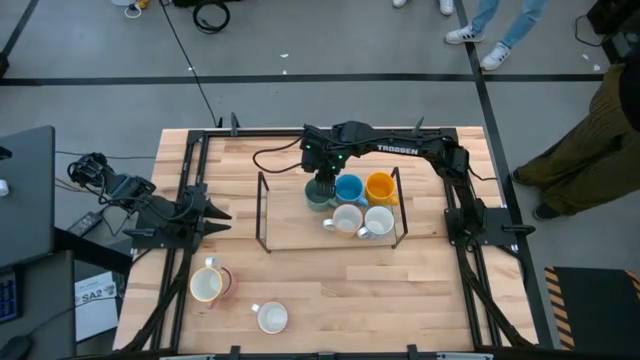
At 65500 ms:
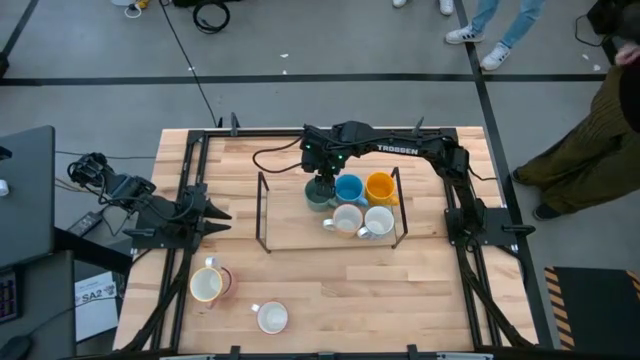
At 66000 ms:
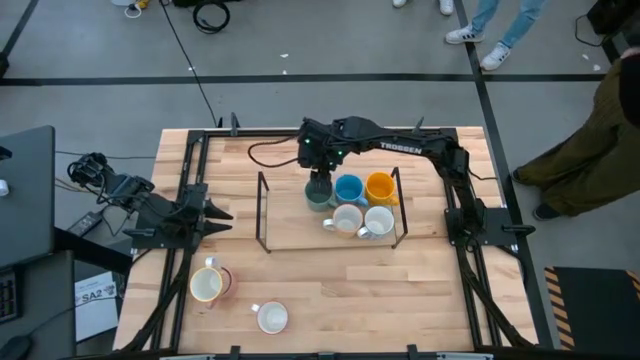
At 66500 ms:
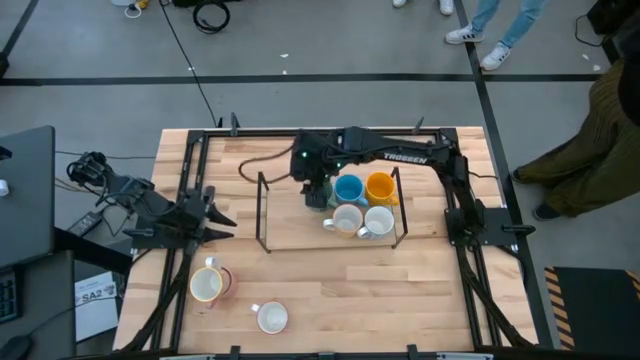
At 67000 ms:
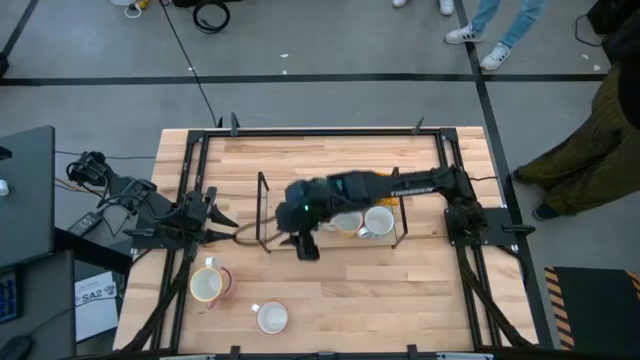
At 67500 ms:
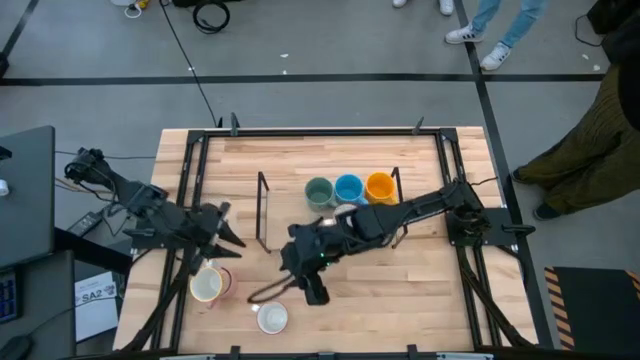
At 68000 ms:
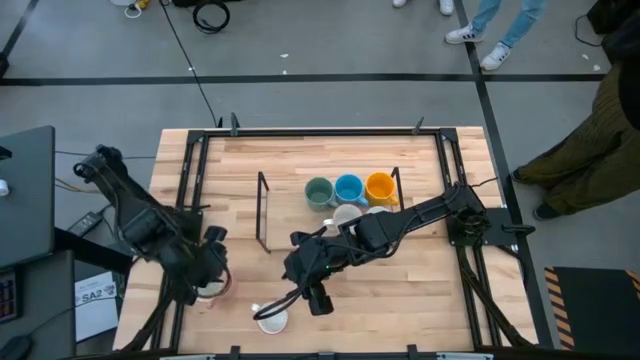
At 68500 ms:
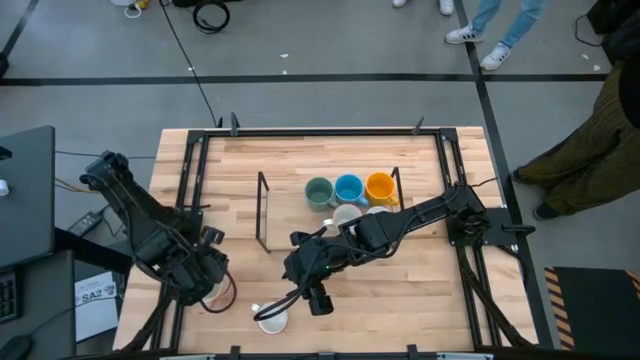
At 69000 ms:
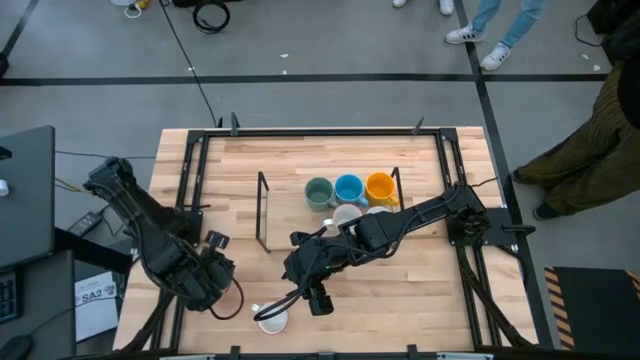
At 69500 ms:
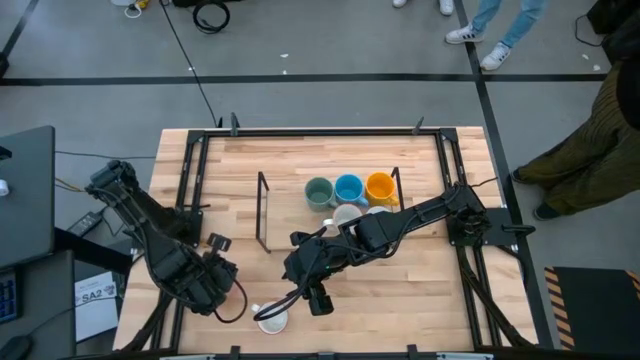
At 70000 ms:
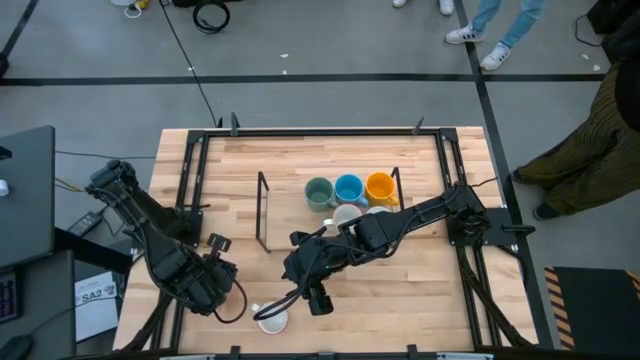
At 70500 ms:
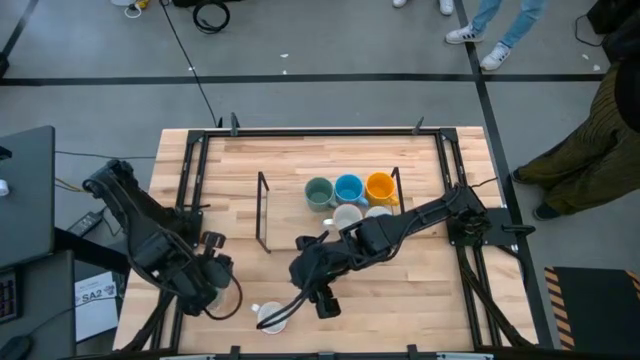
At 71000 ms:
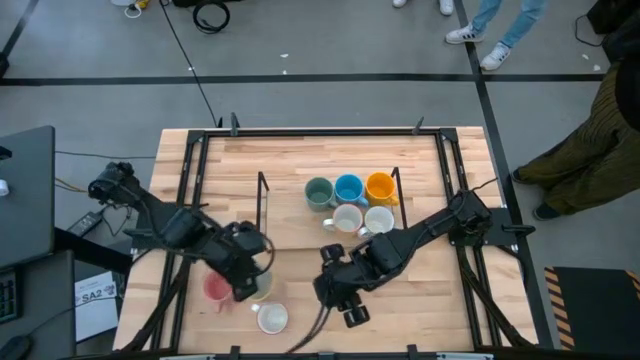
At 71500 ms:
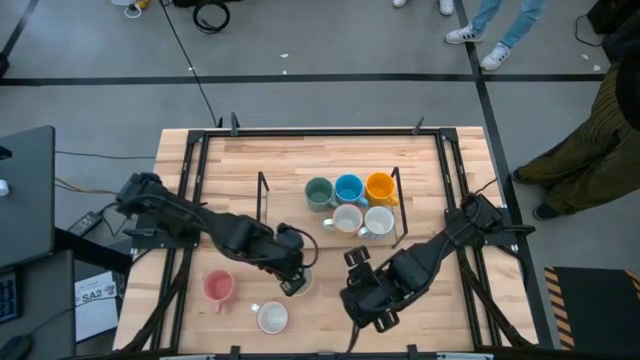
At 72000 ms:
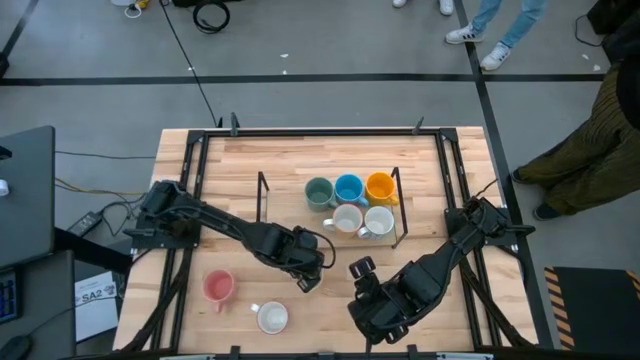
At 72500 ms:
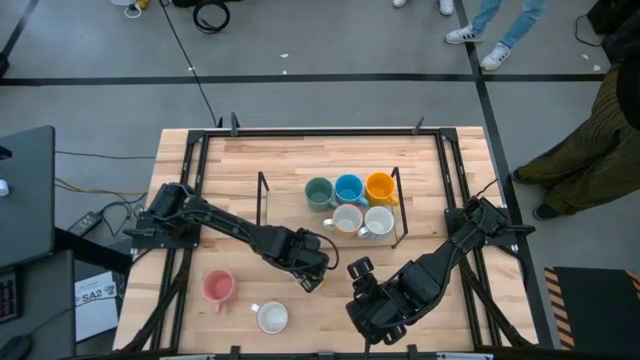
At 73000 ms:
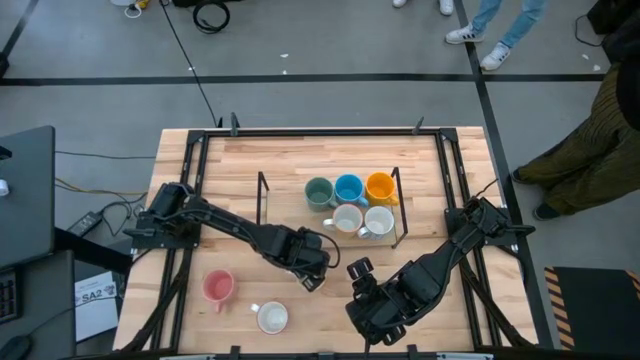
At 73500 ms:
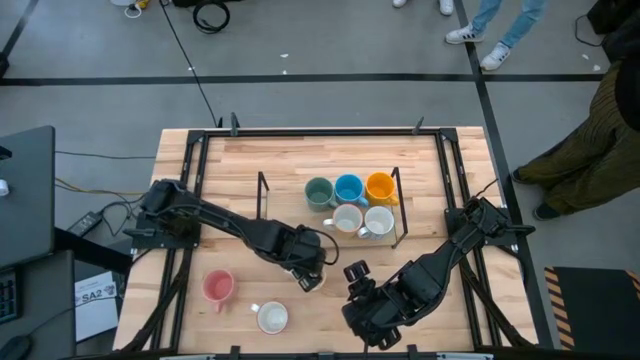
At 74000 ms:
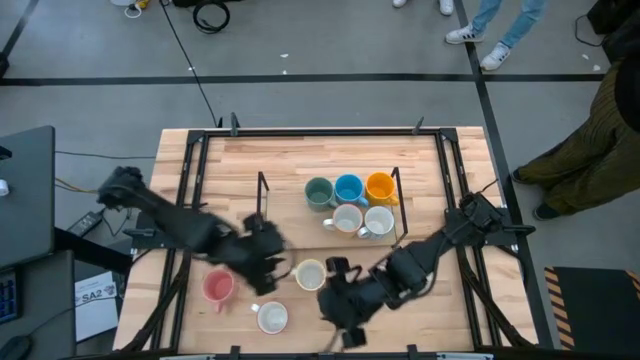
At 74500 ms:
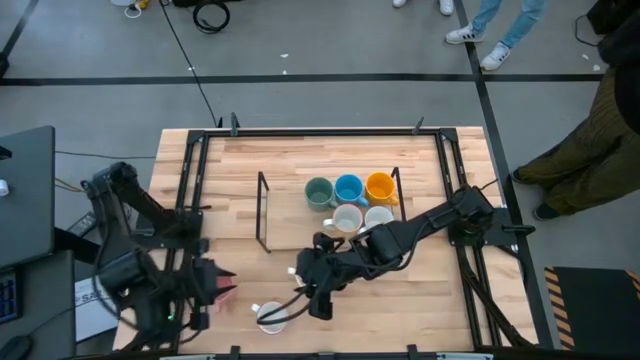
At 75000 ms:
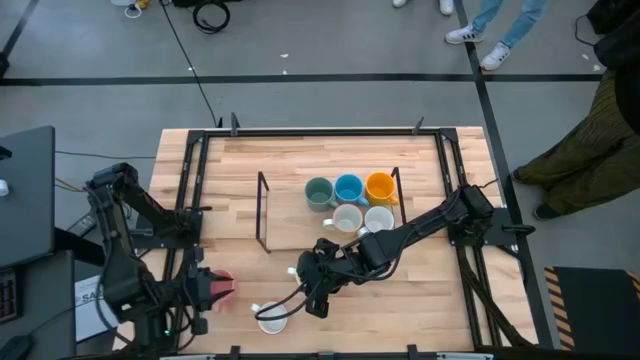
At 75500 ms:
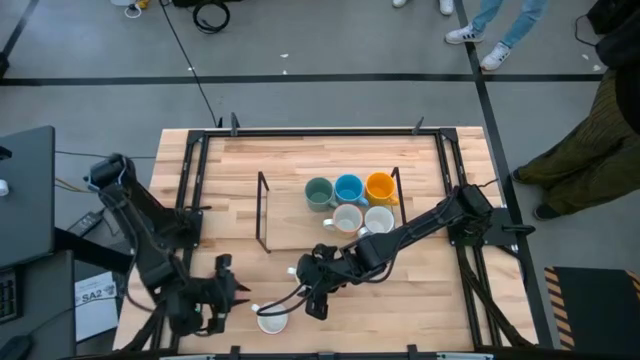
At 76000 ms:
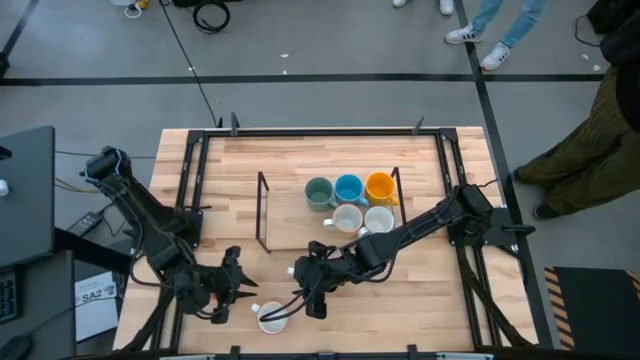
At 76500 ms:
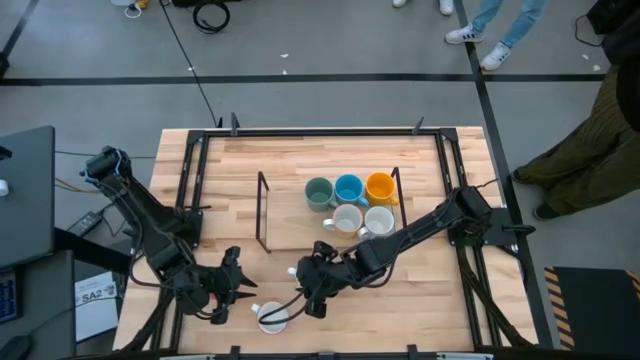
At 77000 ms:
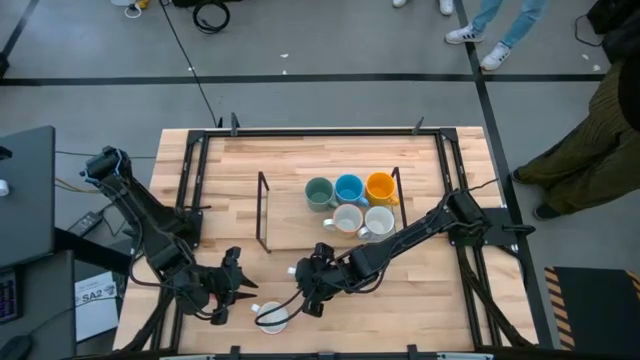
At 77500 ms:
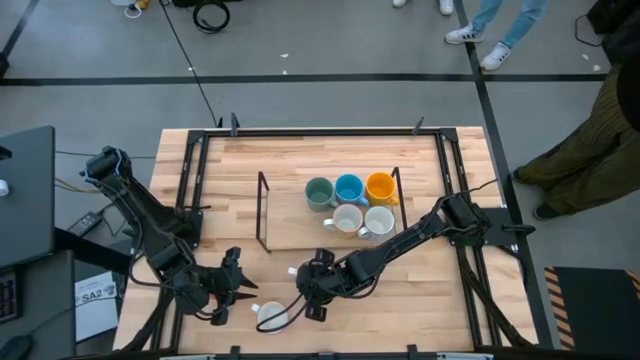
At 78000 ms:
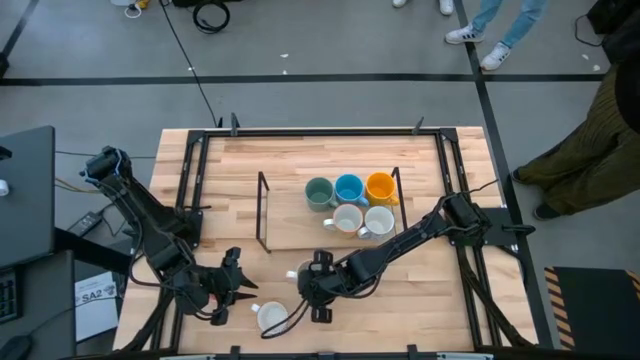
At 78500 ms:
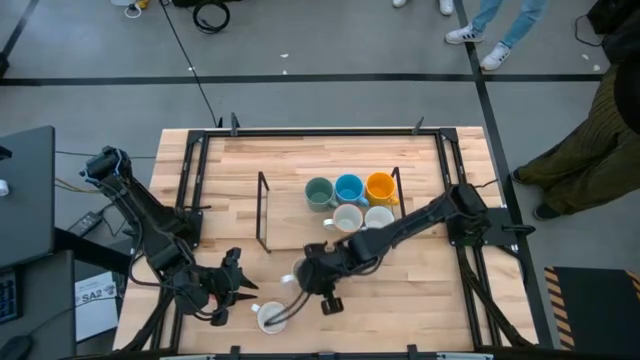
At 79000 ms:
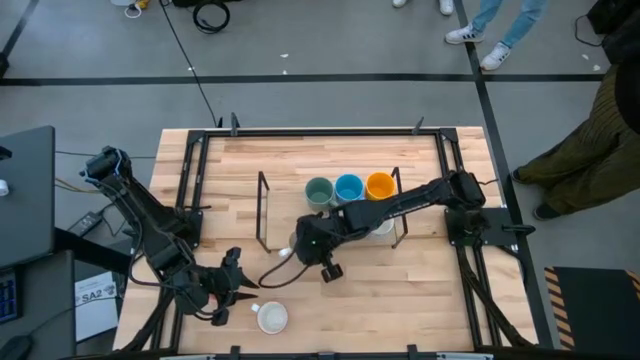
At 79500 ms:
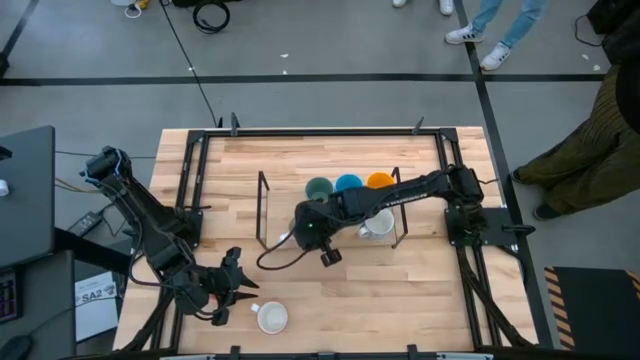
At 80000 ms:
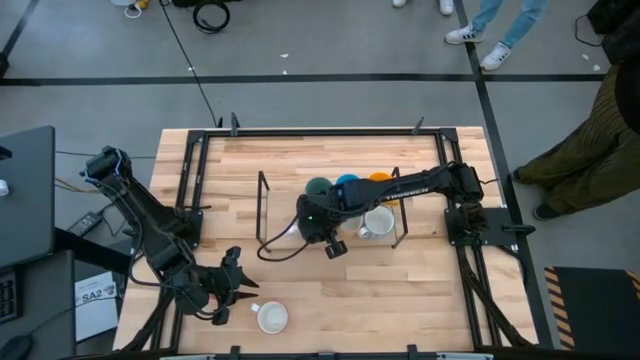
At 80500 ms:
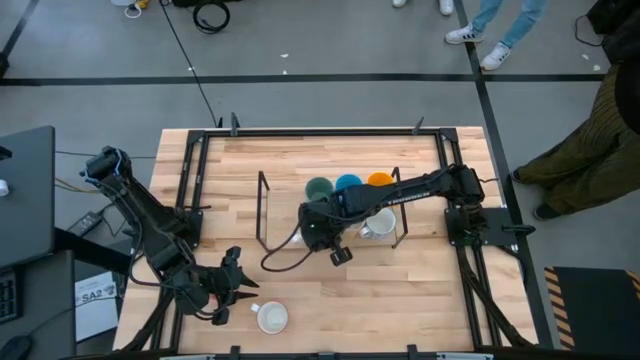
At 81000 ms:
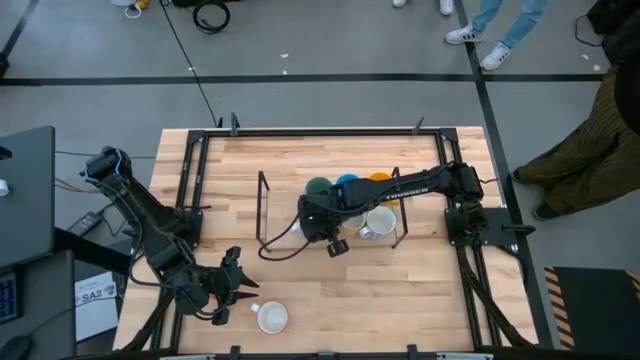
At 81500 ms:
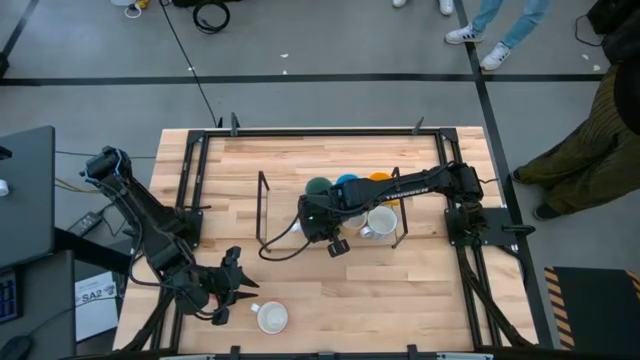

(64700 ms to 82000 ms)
Task: Place coffee mugs
Put the orange white mug on the shelf

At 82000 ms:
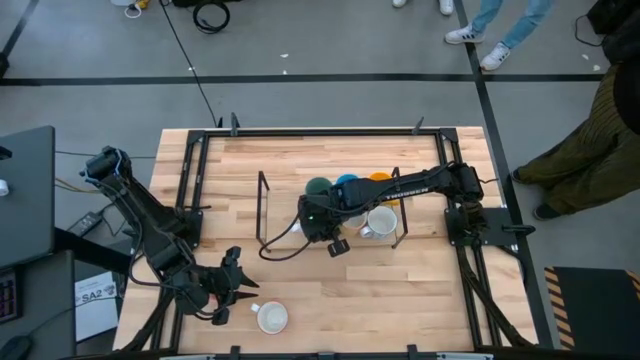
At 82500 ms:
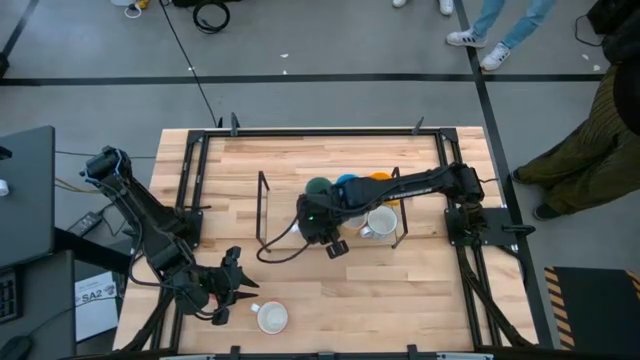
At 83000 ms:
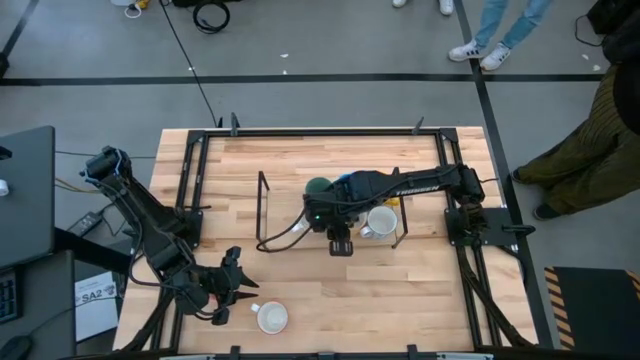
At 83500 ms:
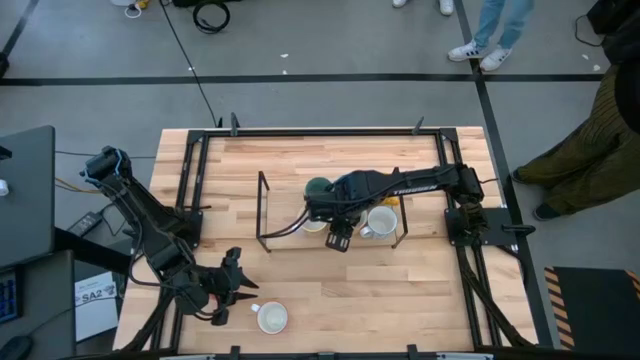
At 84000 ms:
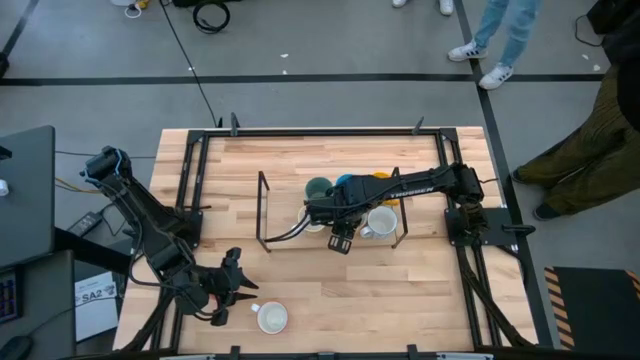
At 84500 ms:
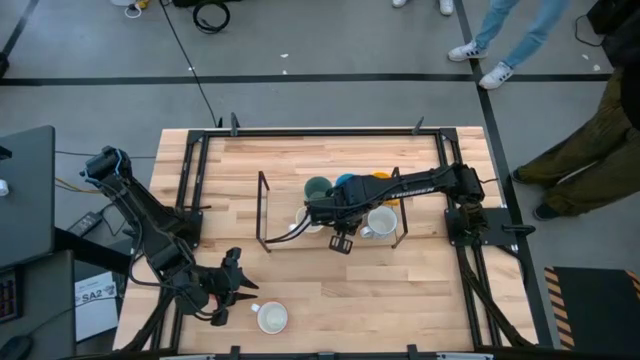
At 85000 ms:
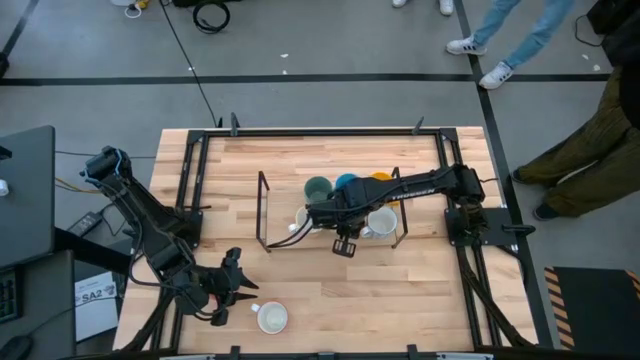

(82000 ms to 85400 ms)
Adjust the yellow white mug on the shelf

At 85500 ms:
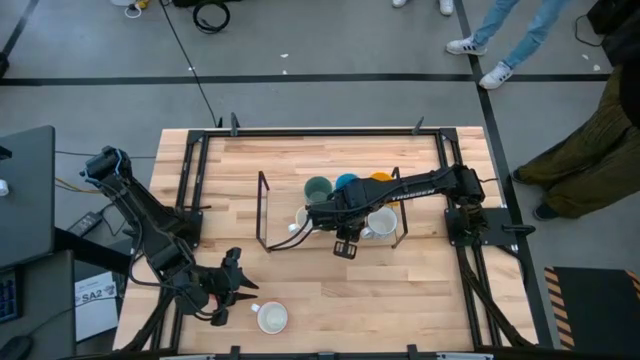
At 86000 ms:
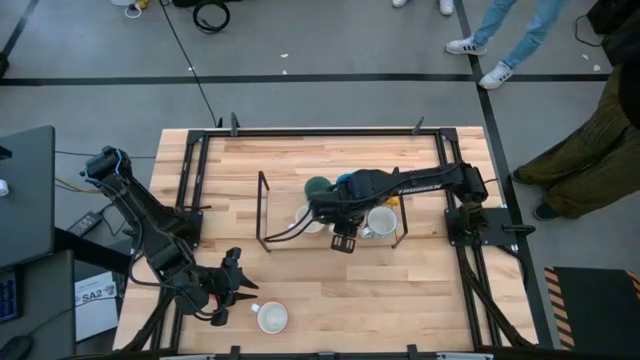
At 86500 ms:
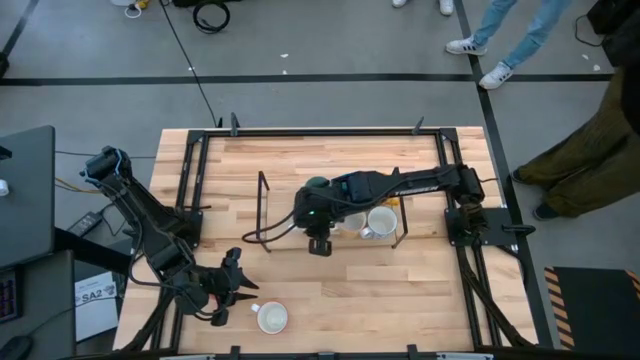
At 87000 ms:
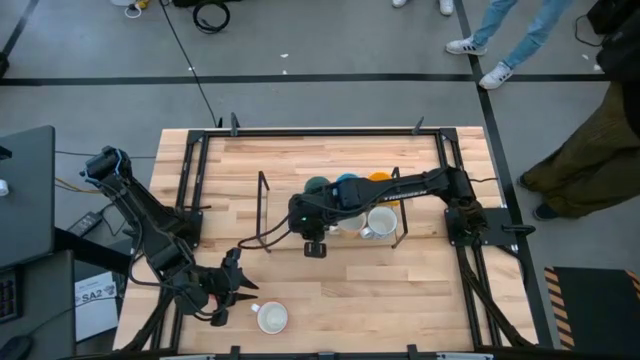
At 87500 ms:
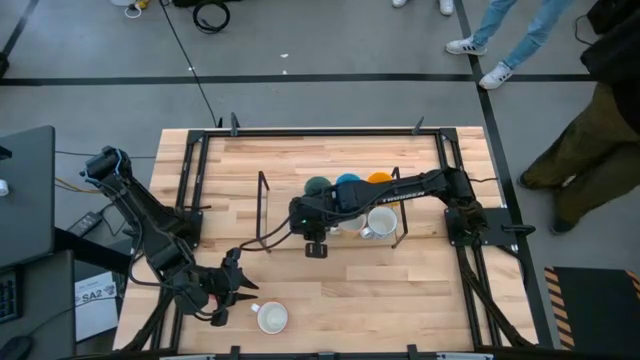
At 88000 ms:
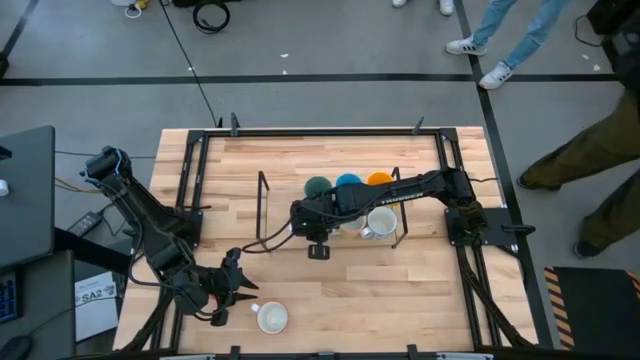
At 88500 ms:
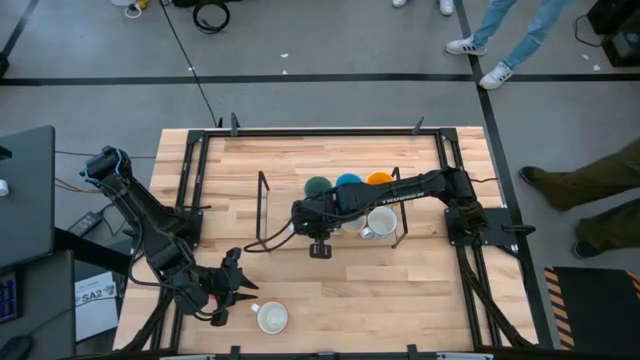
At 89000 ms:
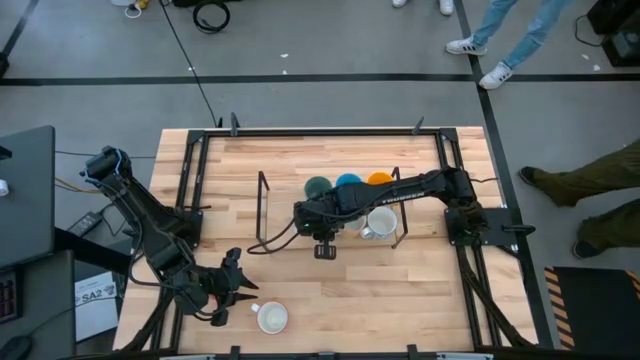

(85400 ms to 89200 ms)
Adjust the orange white mug on the shelf
